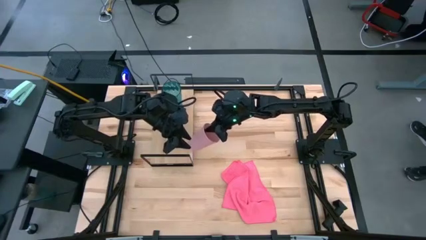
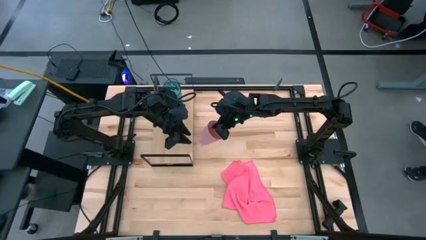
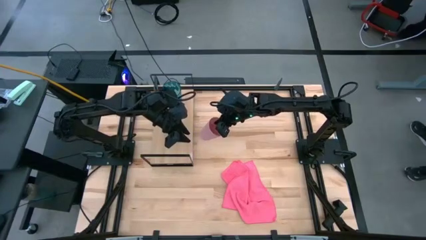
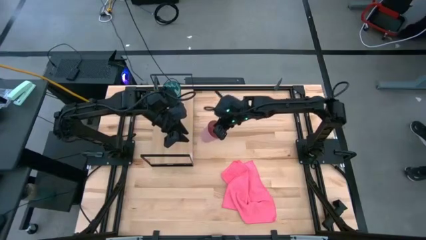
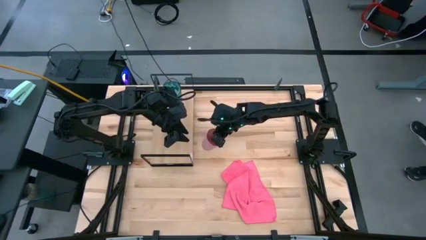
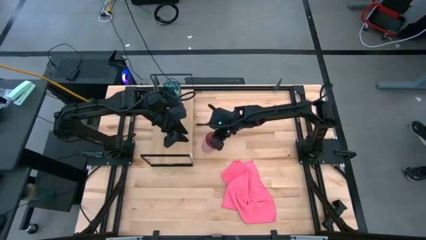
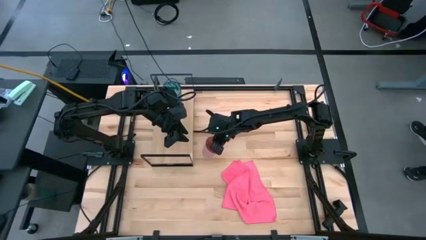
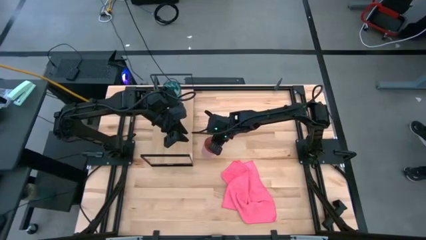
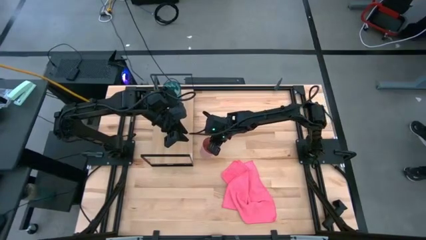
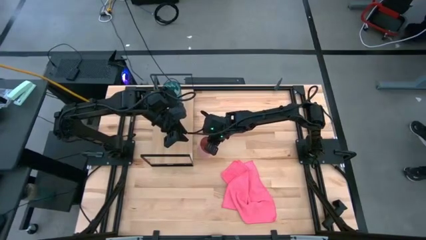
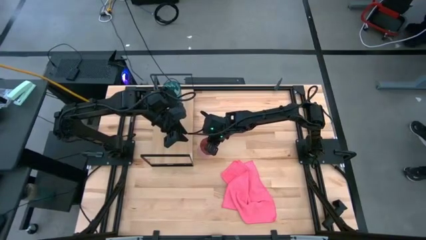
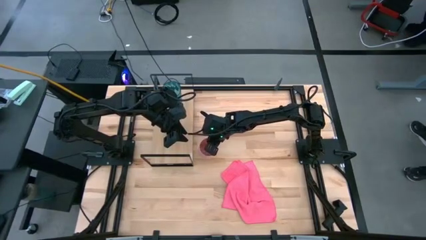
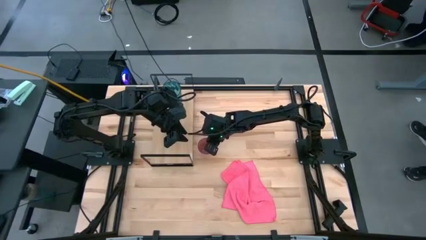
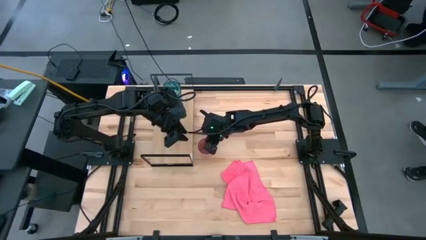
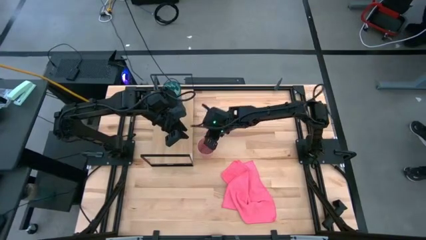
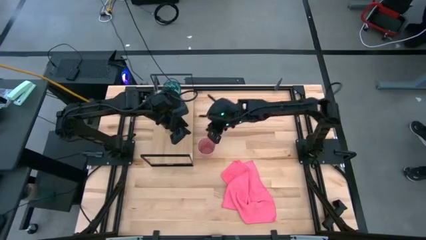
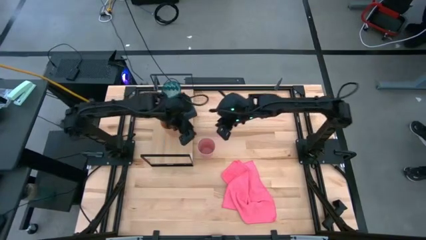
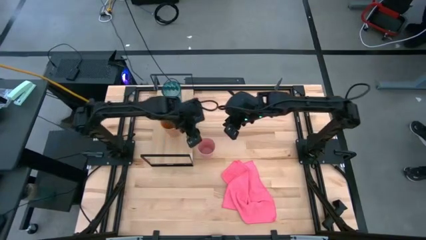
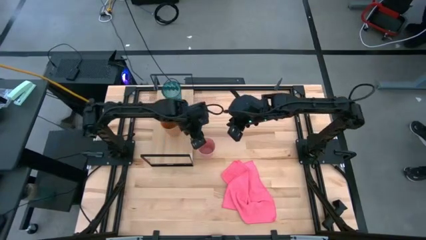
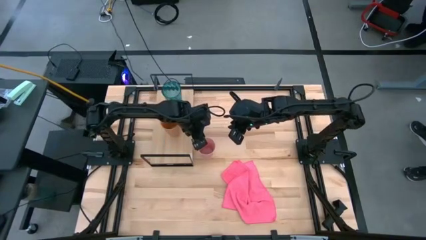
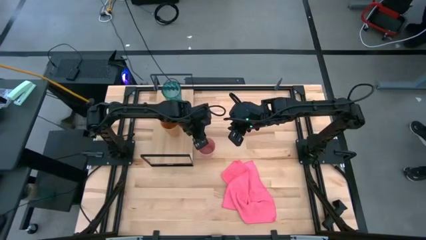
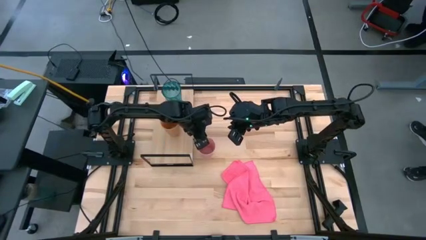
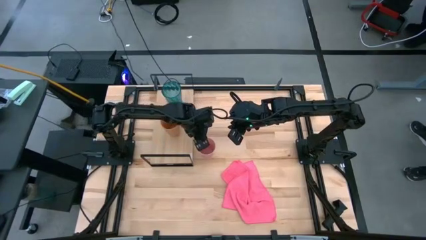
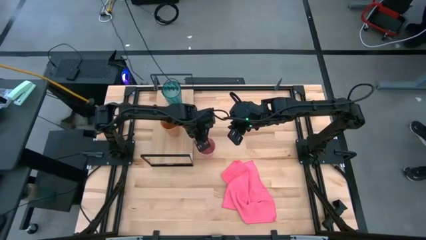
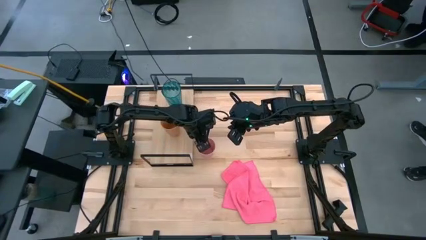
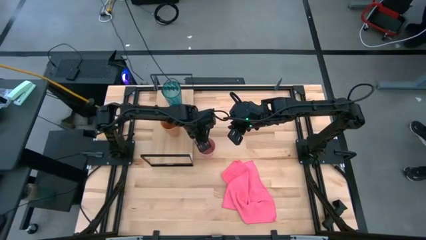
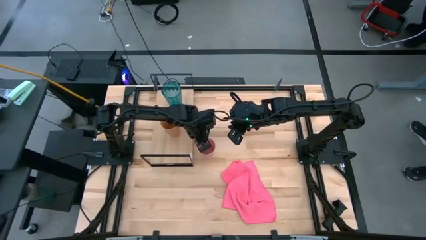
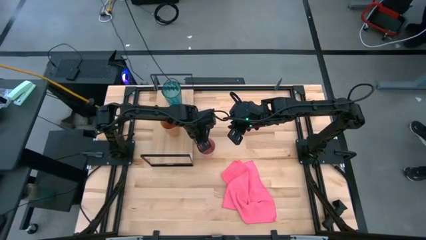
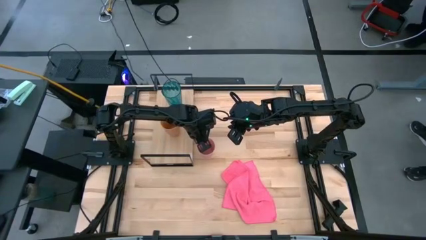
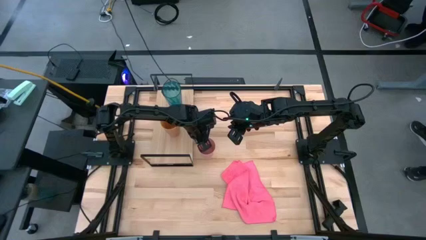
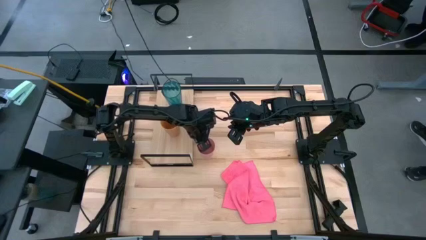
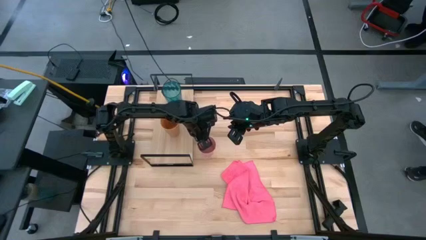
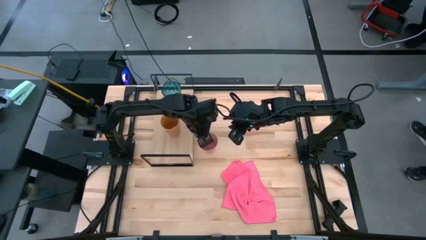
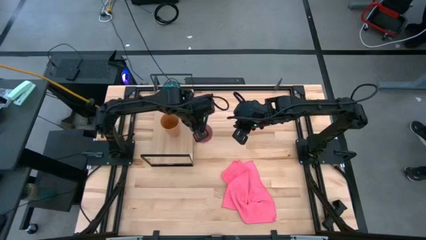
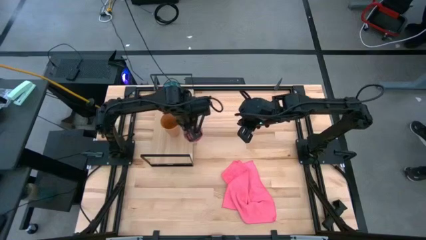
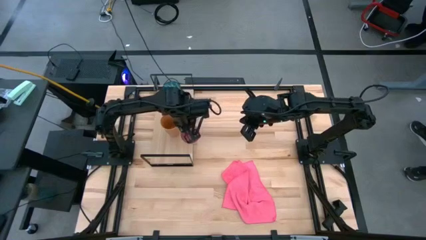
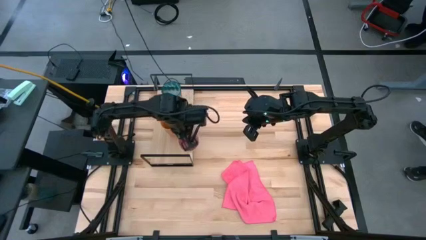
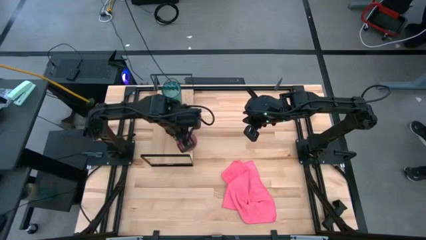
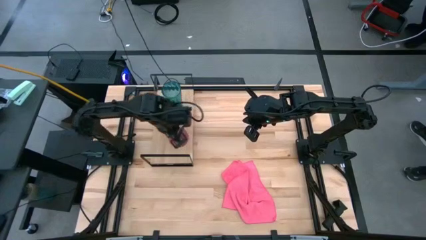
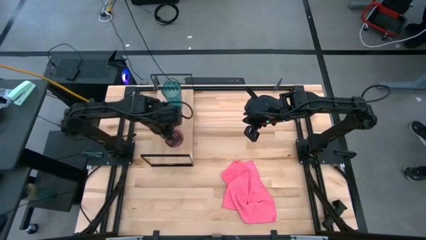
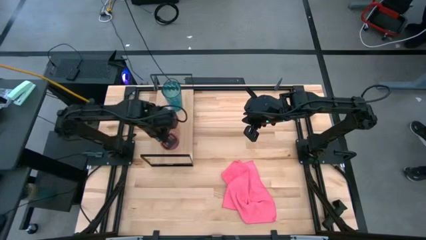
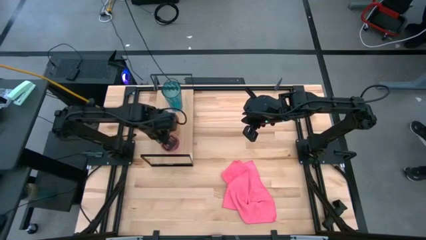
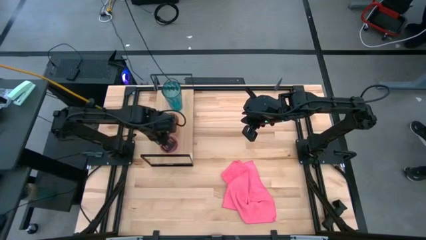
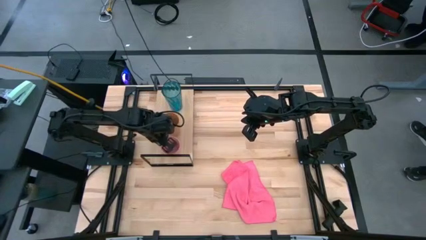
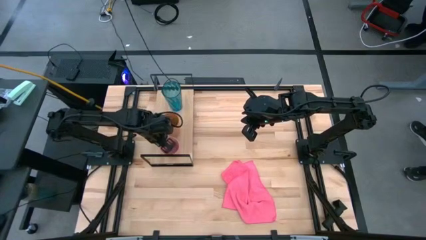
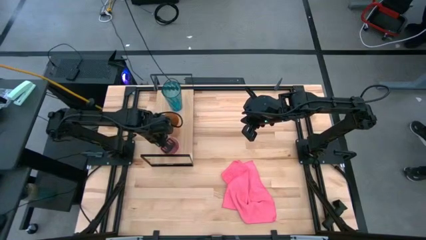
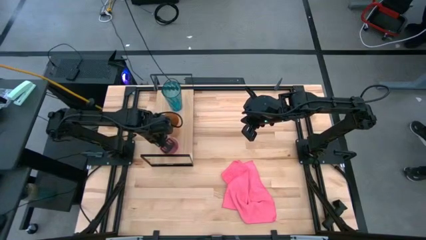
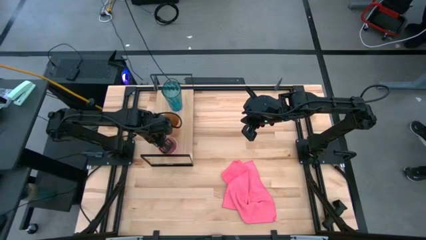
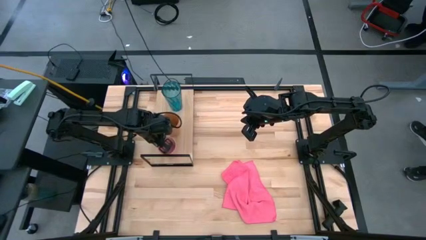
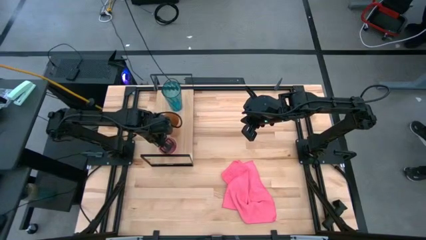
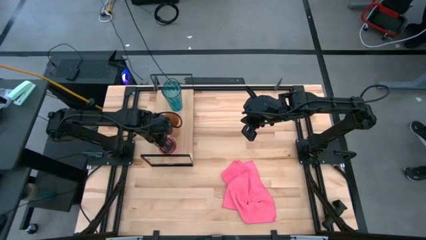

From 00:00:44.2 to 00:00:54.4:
Task: Stack small to large cups/mugs on shelf
Put the pink cup on the shelf
